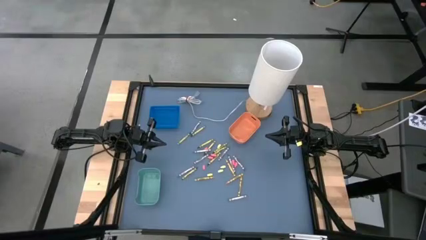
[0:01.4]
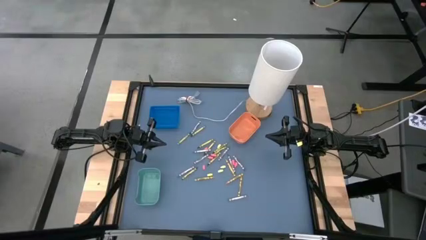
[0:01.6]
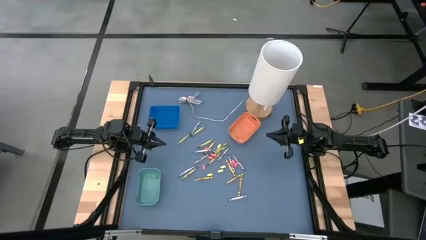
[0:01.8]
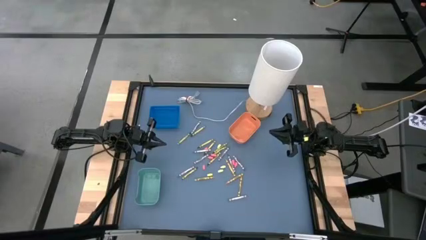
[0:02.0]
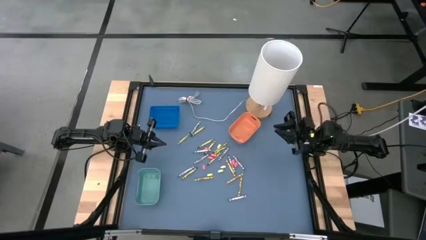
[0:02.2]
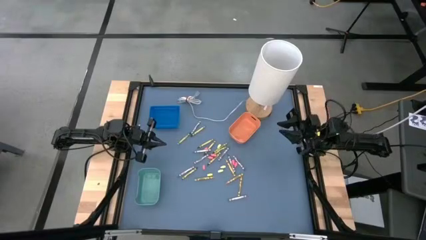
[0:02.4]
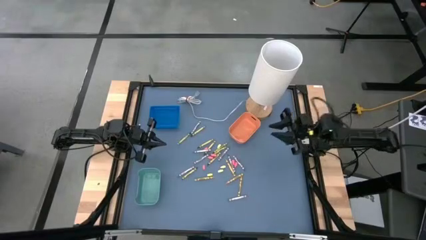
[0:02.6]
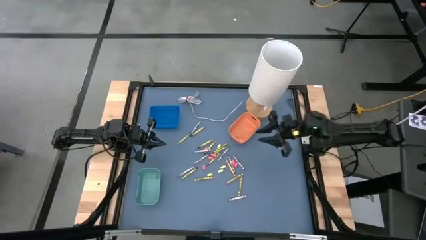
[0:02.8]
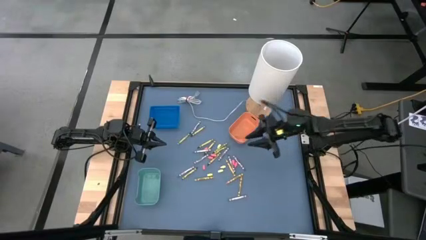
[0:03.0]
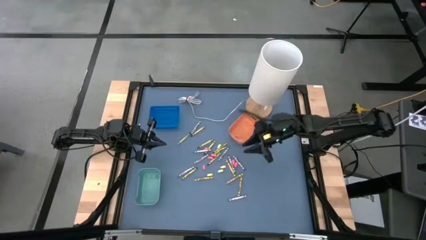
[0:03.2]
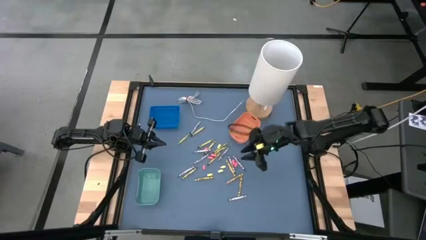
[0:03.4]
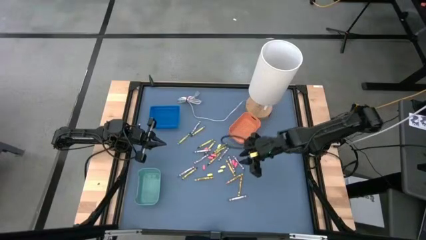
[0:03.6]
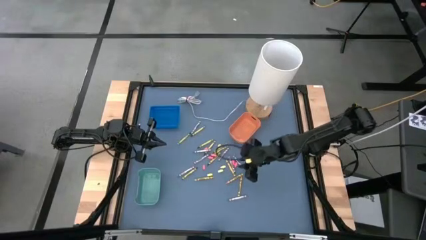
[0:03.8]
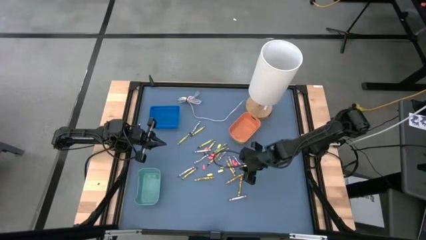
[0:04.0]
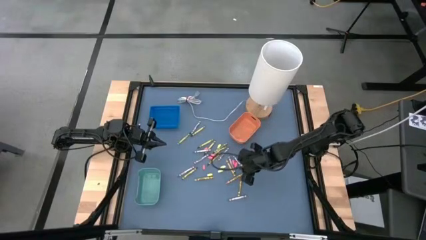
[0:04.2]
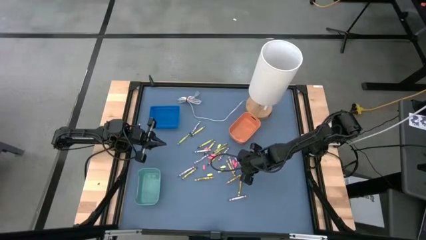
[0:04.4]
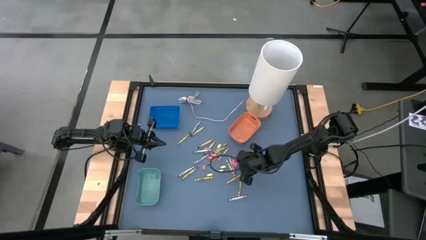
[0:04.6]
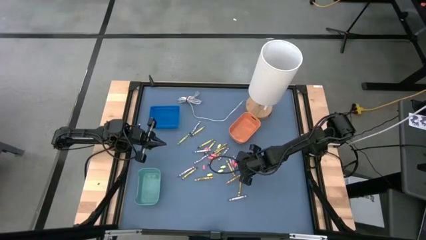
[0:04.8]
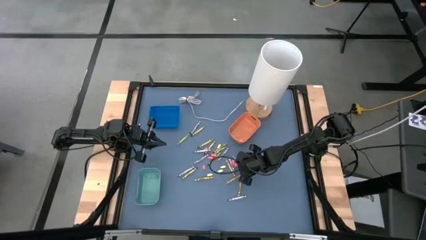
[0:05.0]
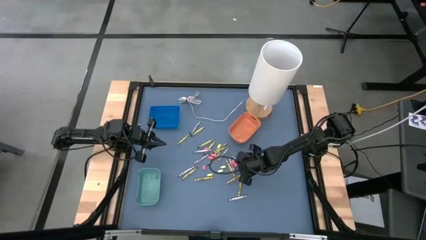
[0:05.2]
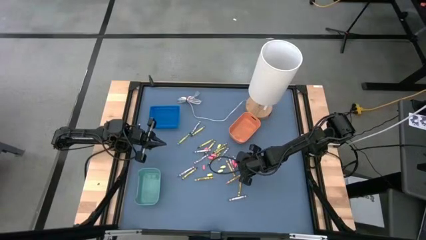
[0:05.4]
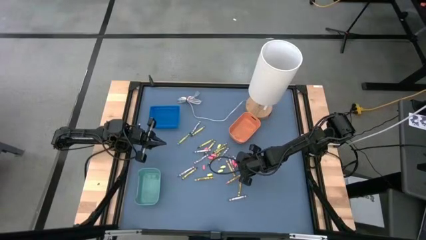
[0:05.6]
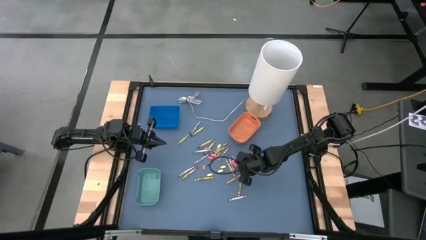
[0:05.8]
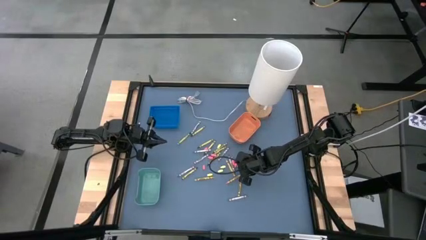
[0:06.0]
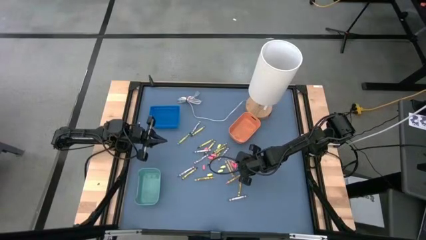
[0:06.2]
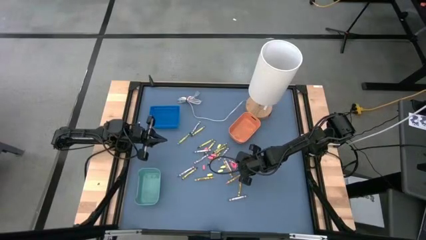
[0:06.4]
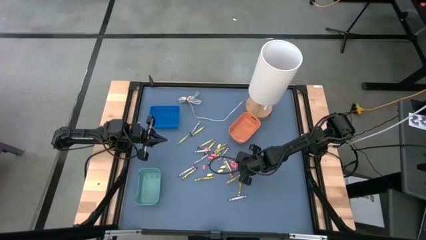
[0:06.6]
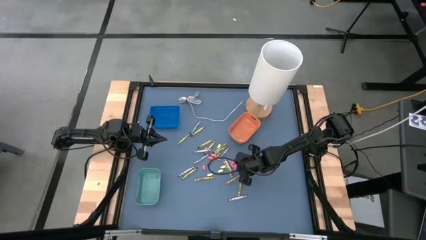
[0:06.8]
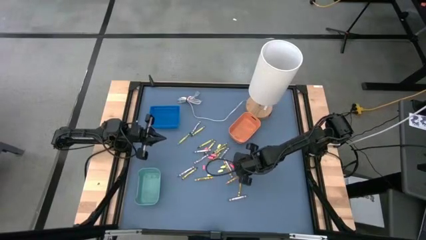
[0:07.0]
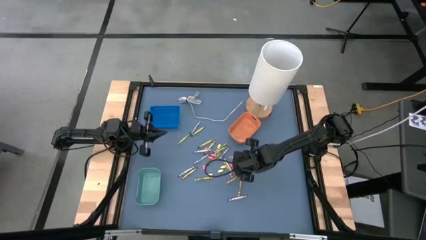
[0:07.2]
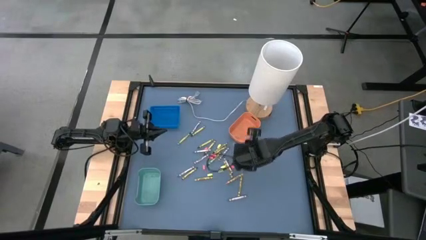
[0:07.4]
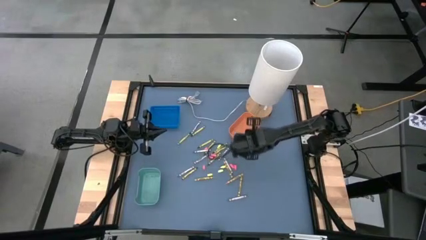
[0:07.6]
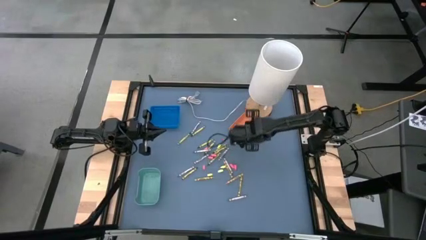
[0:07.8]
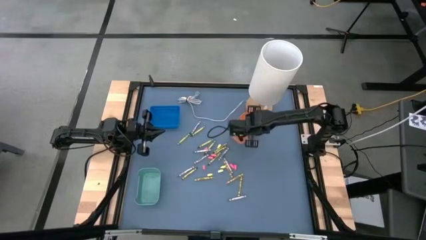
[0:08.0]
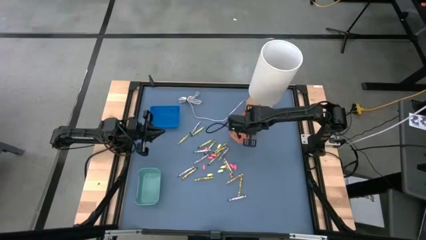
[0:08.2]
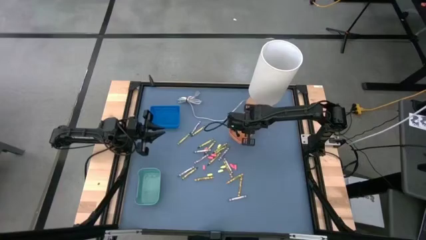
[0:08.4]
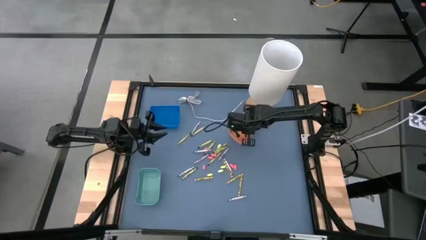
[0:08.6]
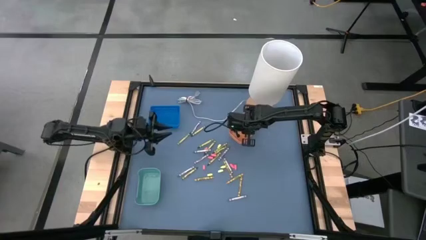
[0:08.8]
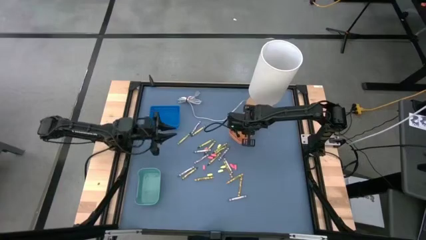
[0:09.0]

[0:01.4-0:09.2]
Task: Sort crayons
Put the gray crayon into the orange bin

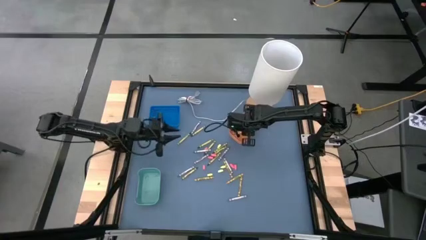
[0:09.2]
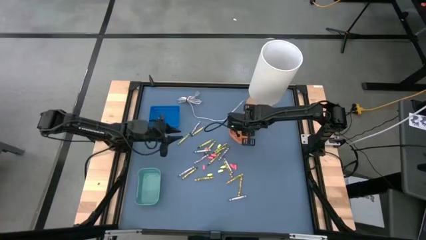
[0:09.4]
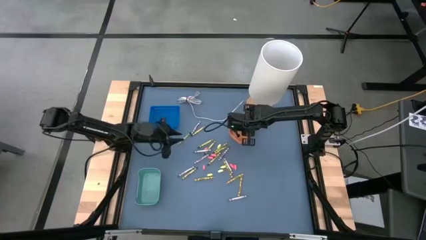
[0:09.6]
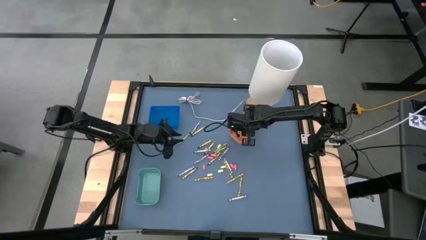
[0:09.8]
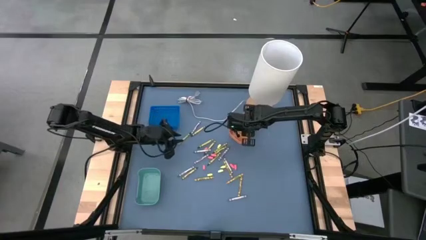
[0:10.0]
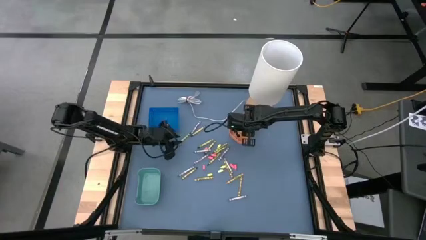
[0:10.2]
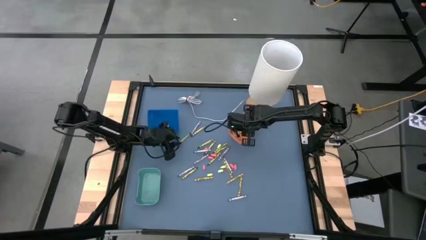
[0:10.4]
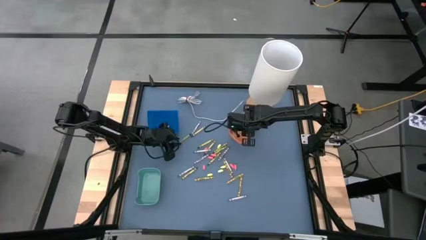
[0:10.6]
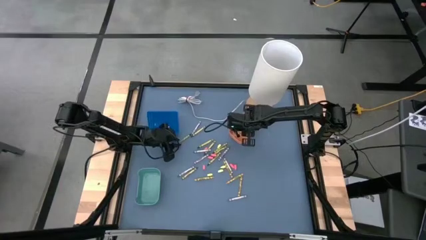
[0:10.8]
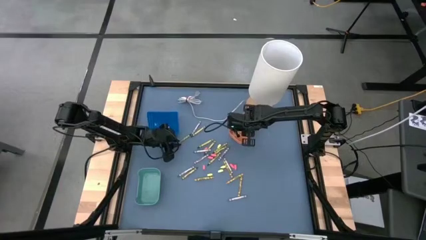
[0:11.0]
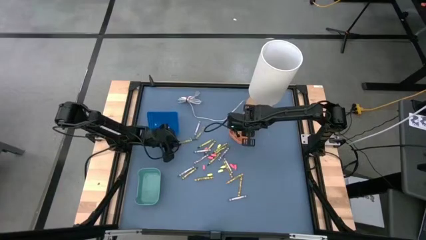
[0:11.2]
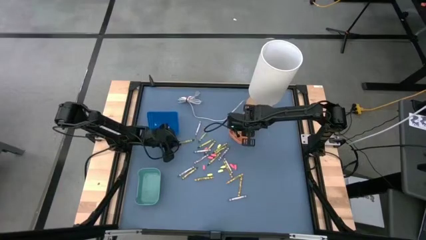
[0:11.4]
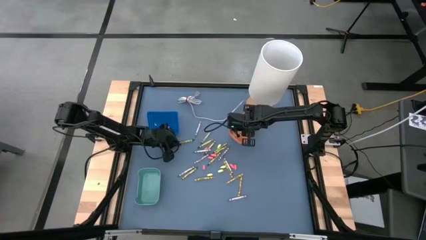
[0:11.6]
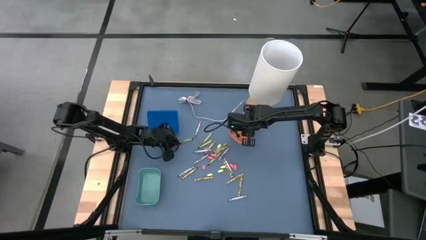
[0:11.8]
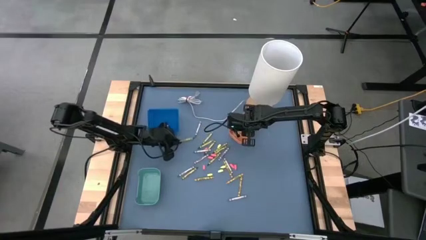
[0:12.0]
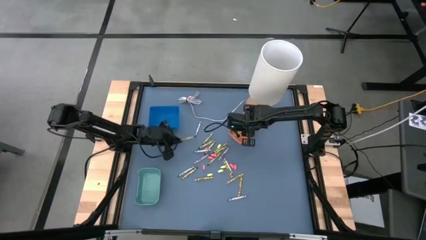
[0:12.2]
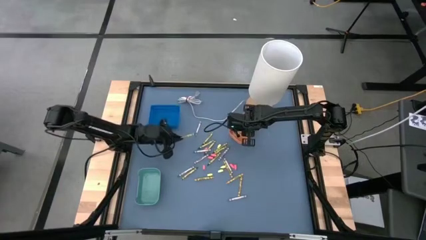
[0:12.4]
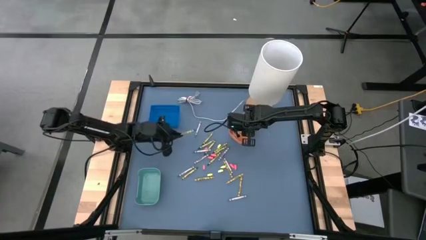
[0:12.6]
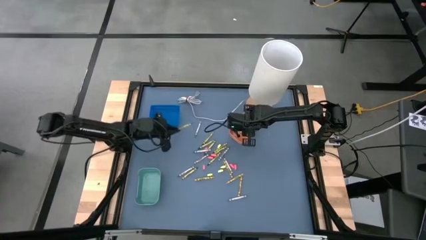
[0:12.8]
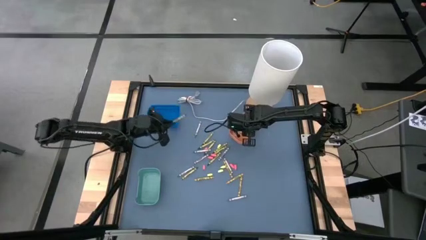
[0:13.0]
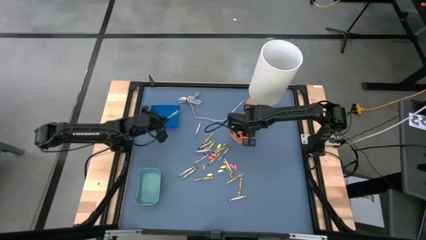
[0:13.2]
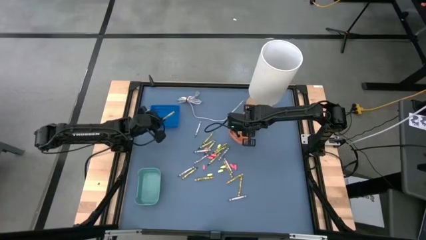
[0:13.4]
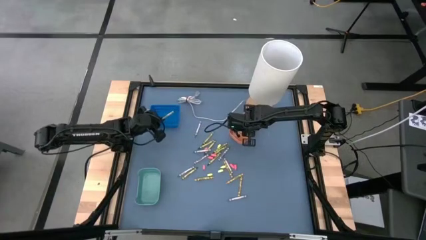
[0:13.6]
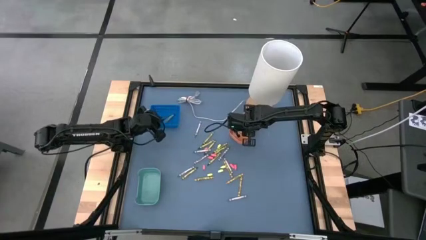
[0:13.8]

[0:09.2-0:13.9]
Put the green crayon into the blue bin

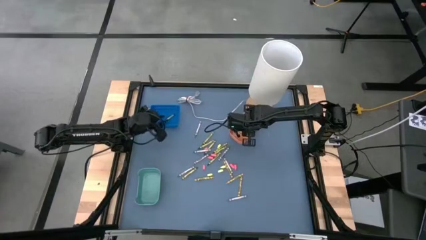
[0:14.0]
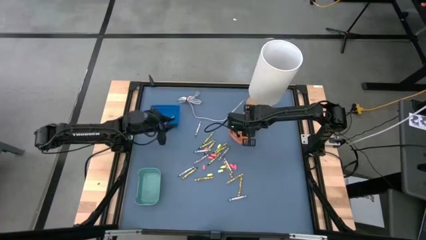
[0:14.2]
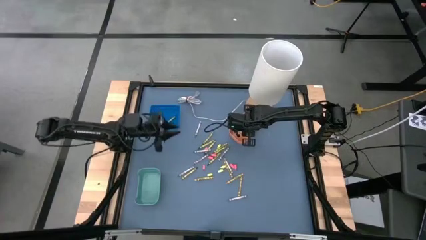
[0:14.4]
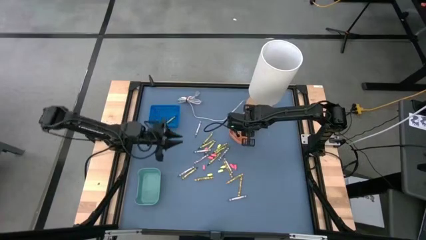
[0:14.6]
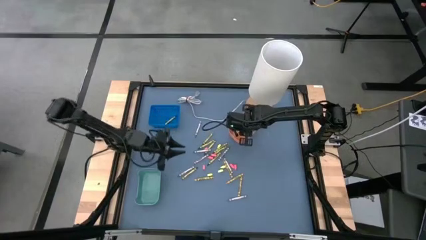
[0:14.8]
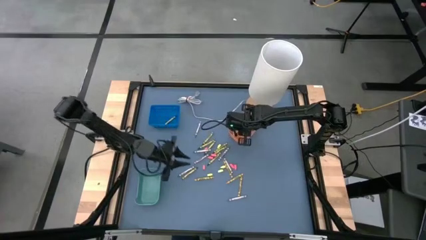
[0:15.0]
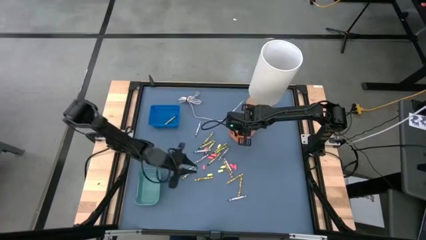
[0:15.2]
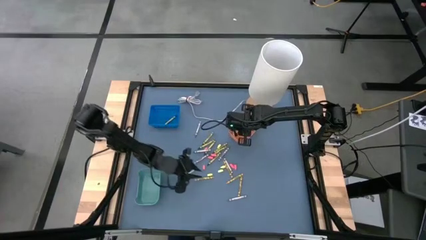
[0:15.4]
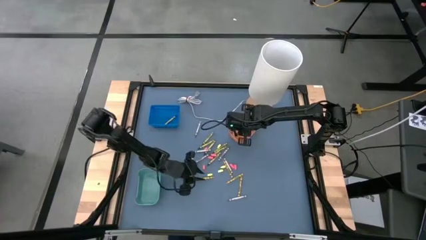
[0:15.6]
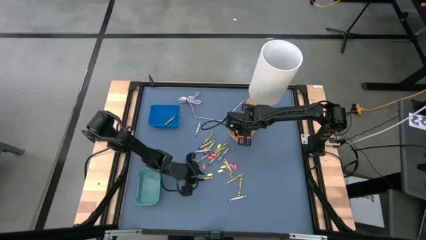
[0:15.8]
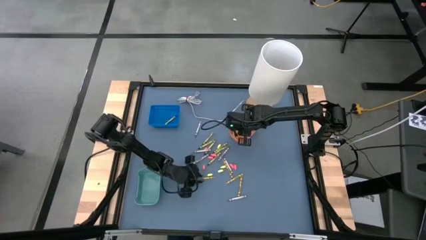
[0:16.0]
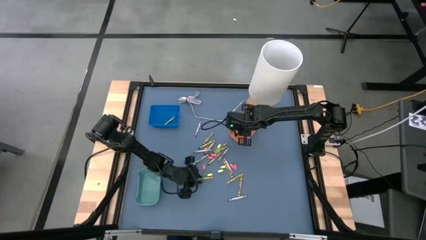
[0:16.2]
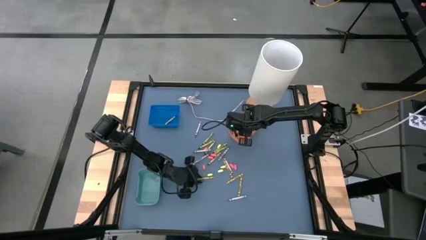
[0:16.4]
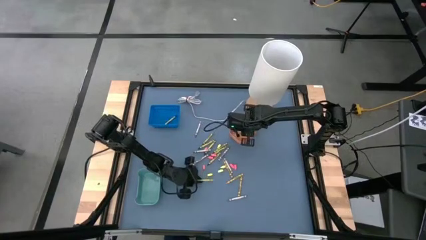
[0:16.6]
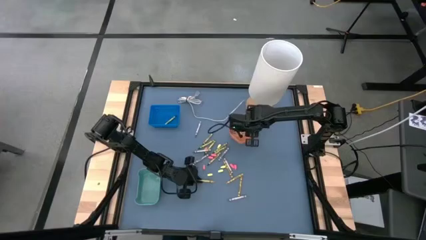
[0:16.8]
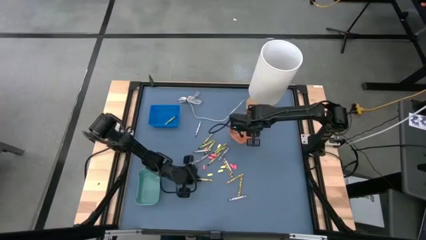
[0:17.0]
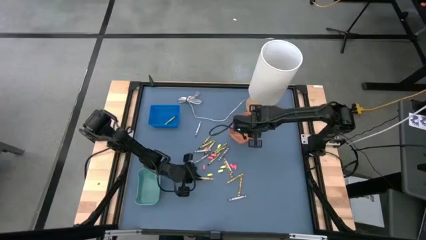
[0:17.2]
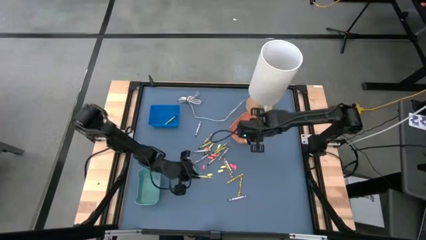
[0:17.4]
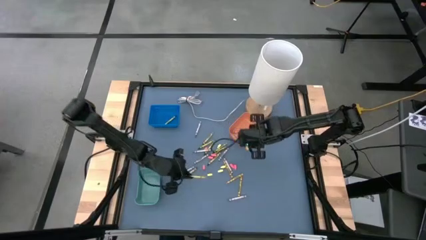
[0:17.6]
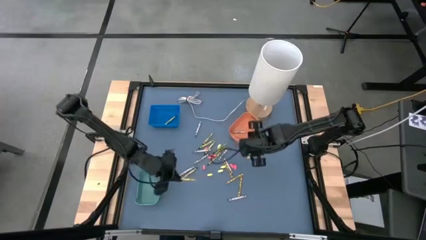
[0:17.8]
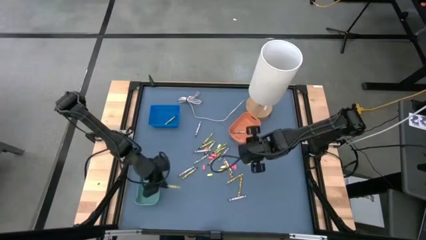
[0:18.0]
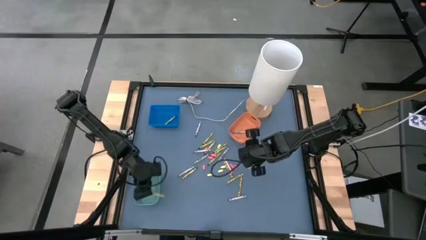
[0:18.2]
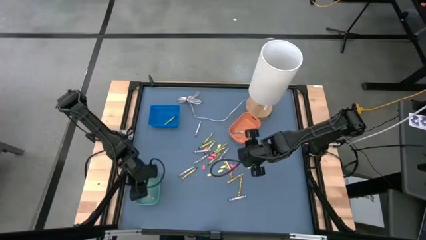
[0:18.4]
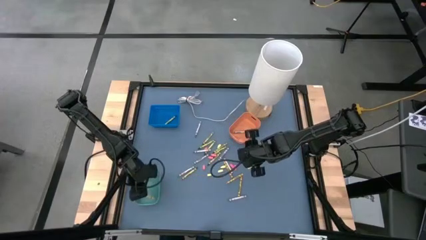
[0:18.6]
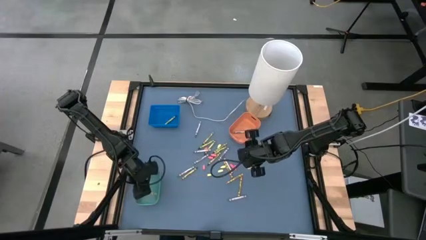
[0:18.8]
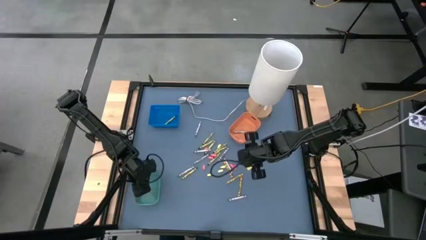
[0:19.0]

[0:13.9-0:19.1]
Put the yellow crayon into the green bin
